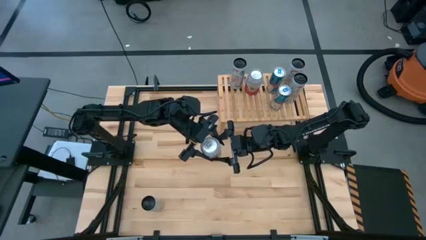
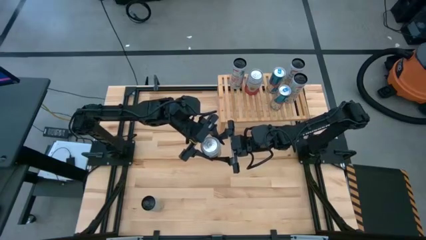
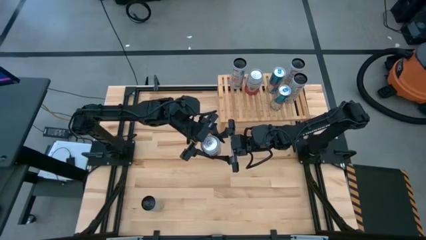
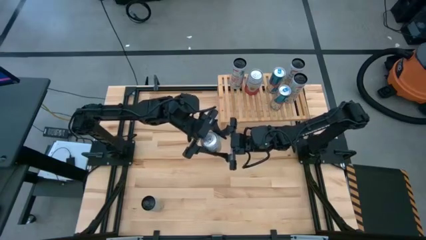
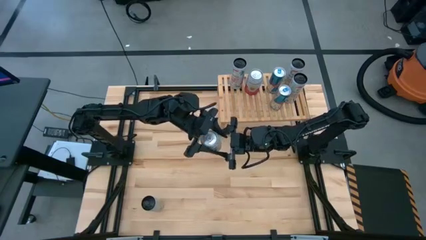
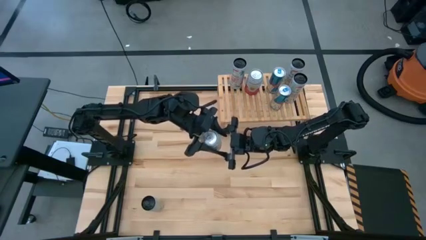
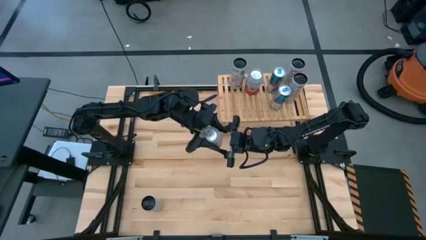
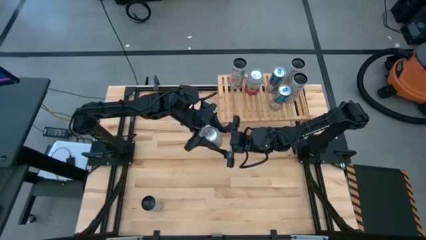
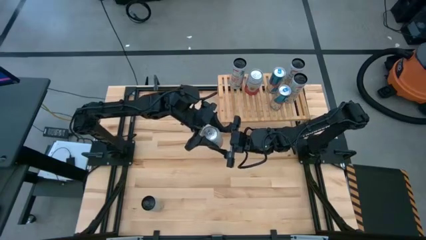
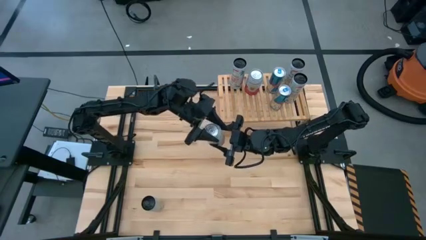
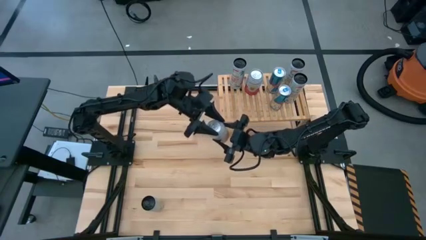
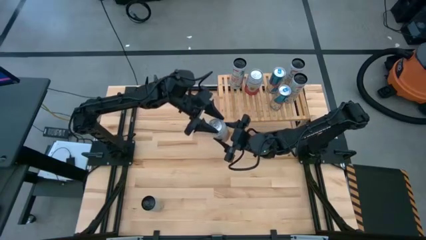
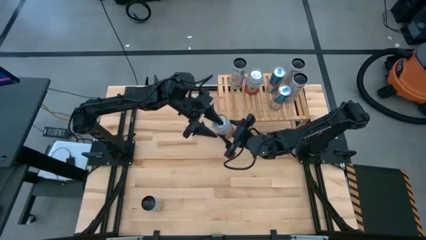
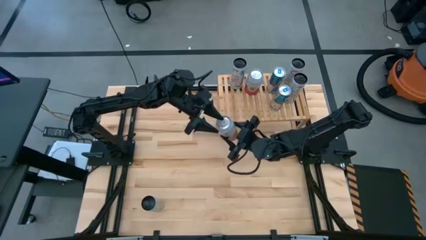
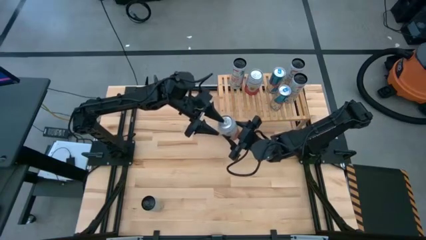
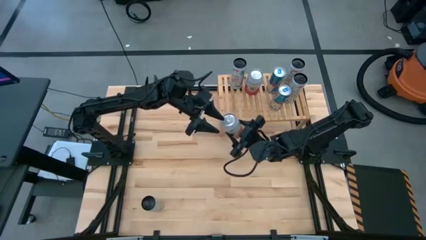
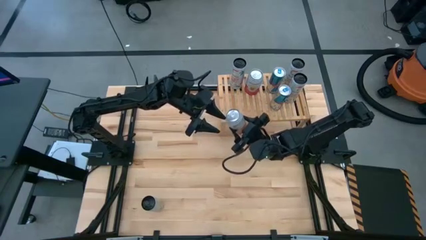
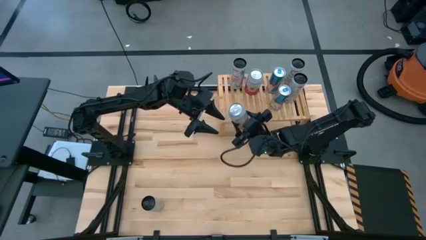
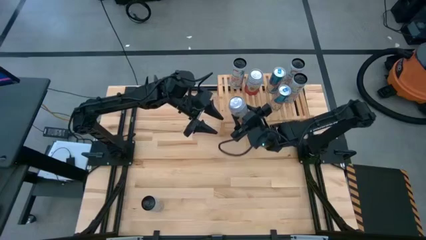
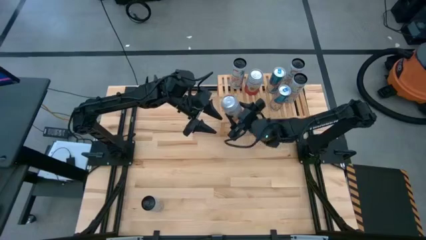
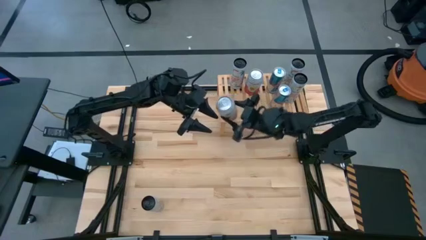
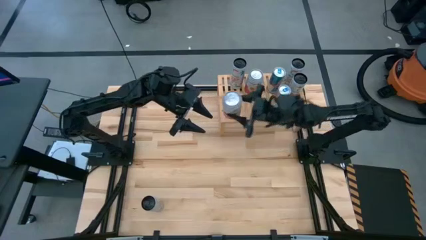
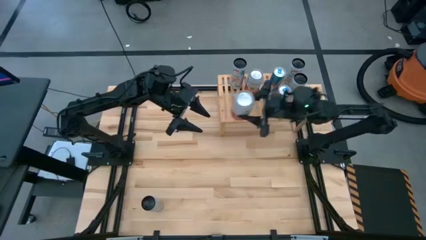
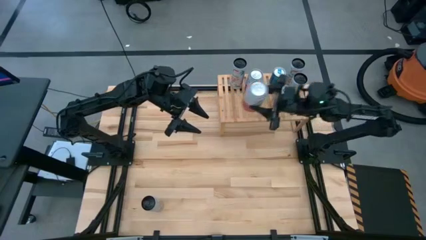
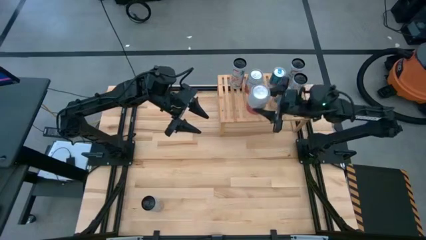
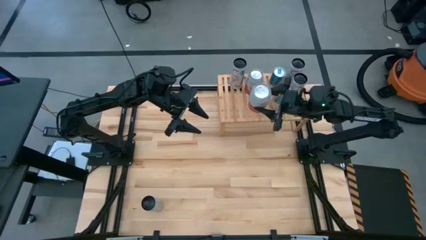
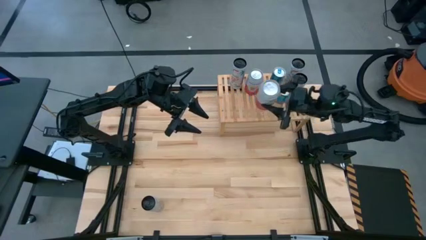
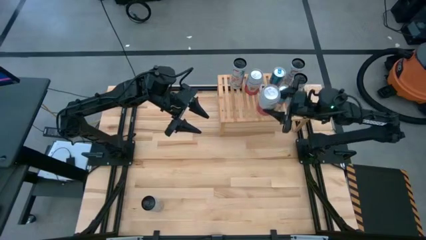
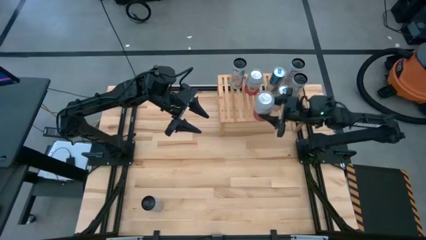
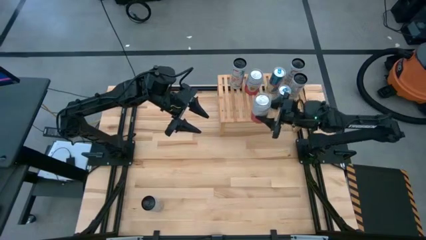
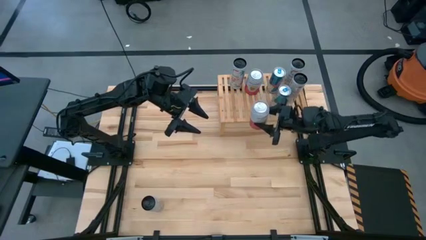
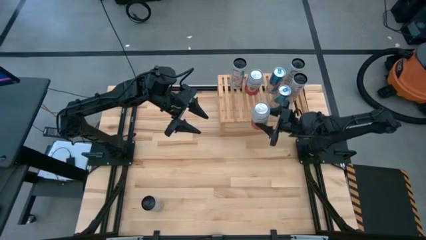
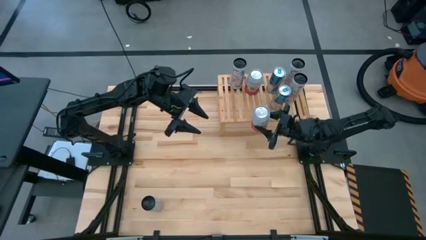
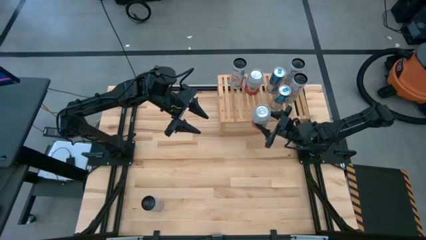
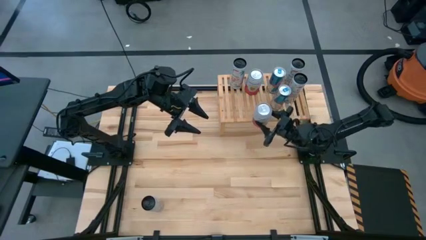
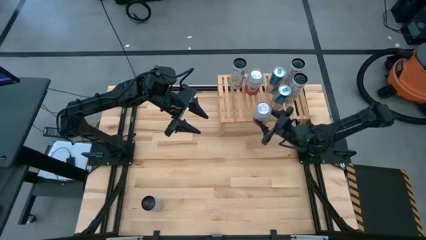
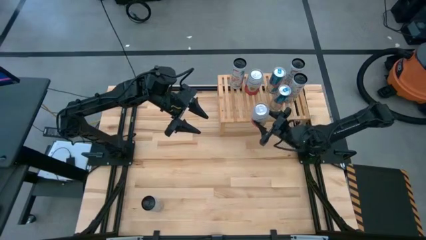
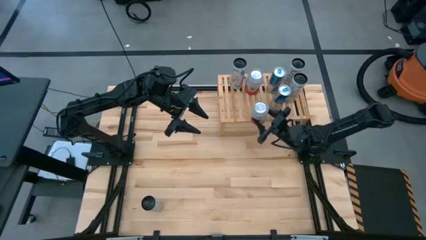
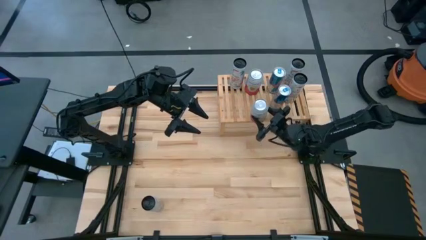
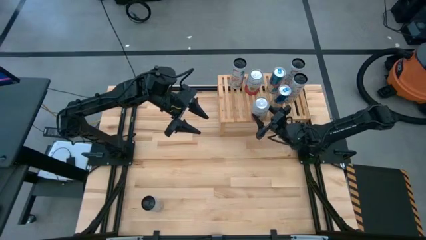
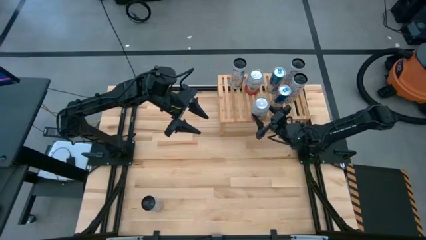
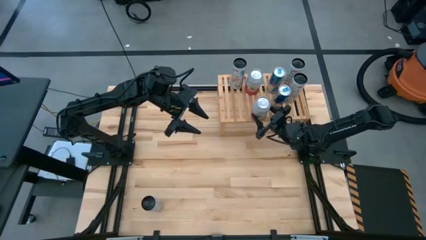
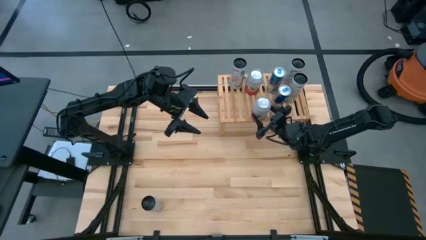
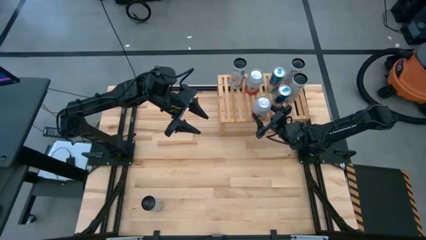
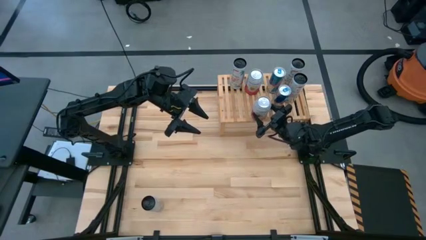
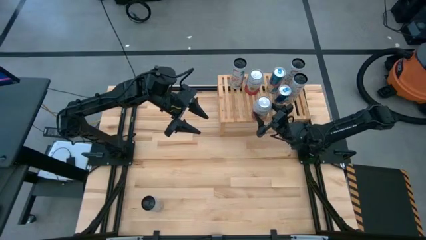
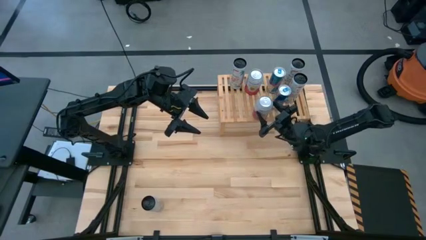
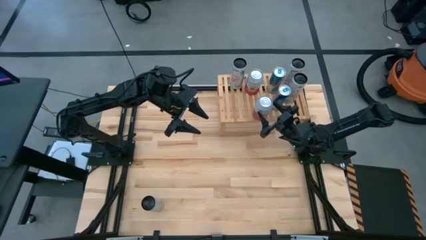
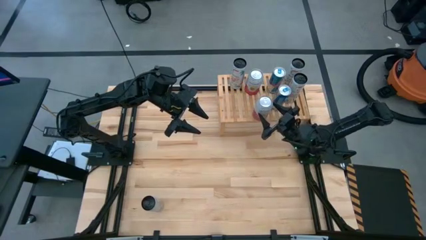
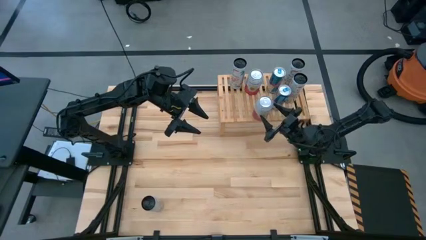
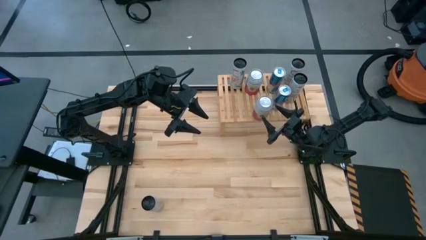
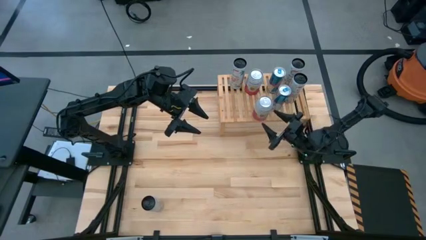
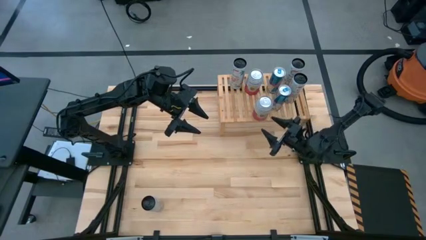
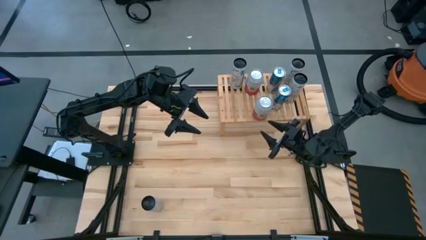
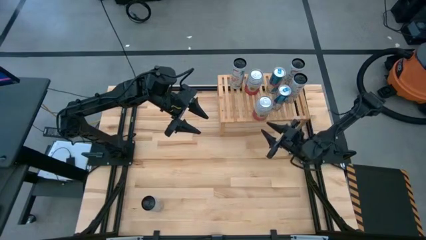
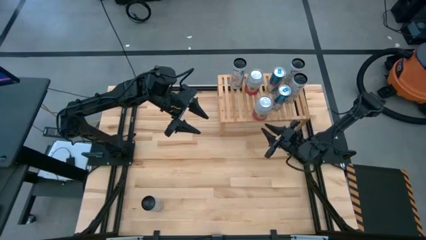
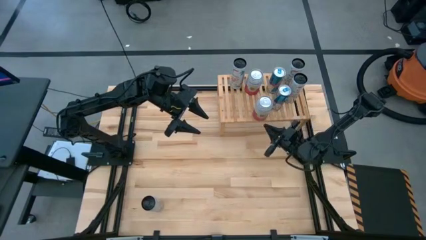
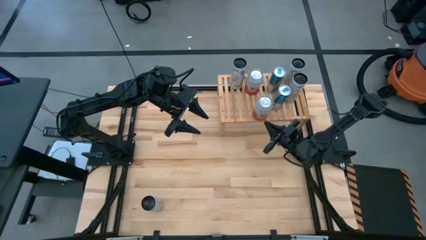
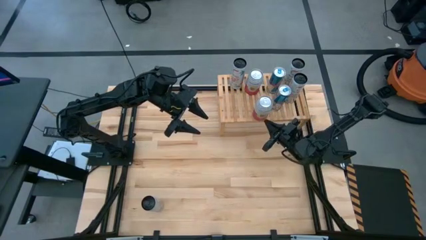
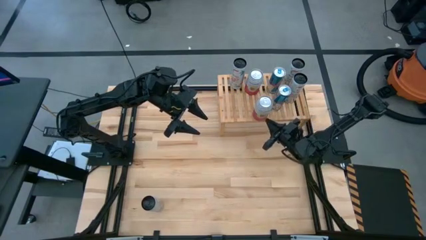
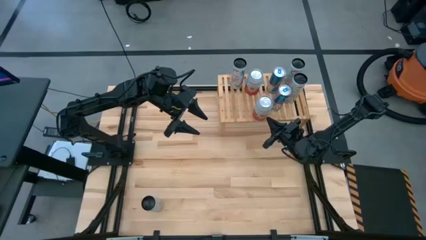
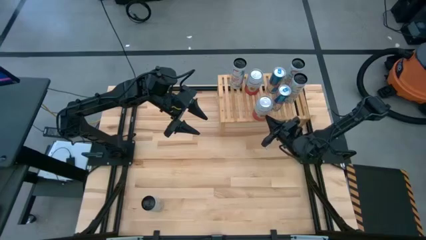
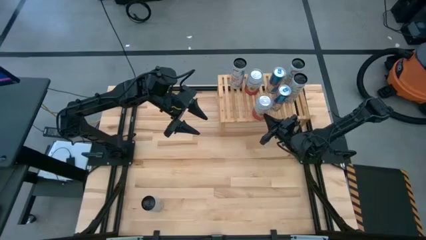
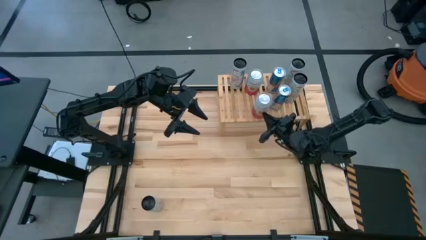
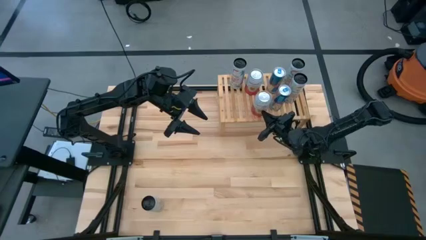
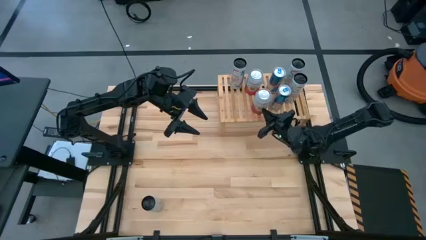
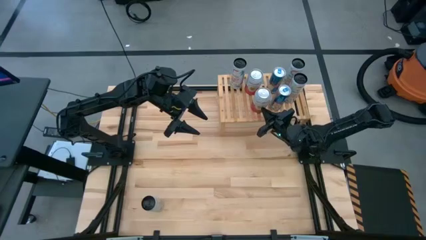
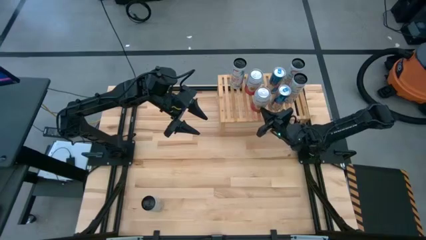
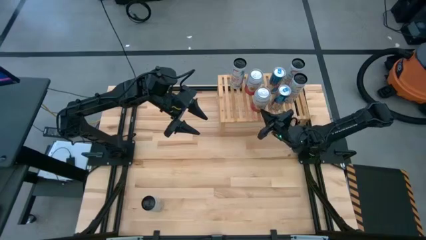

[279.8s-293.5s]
Task: Place canned beverage on shelf
Put the pink-white soda can on the shelf aligned with the other pink-white soda can
